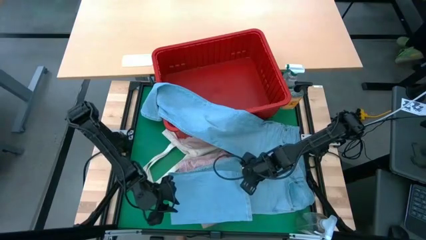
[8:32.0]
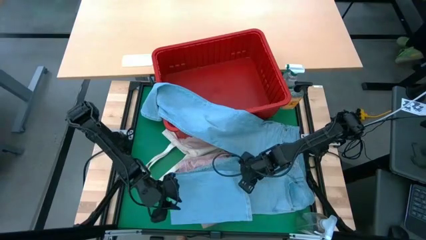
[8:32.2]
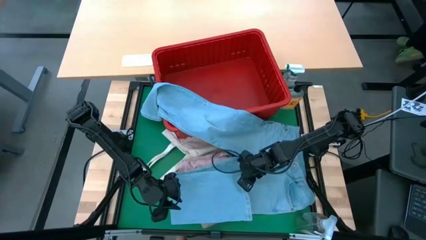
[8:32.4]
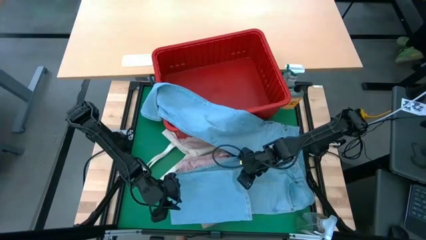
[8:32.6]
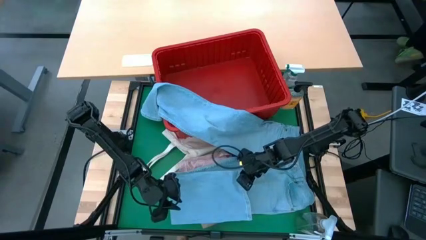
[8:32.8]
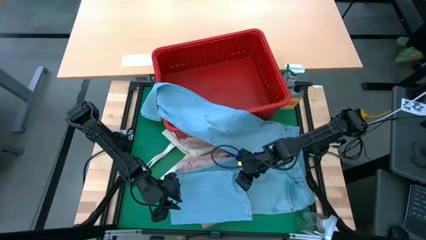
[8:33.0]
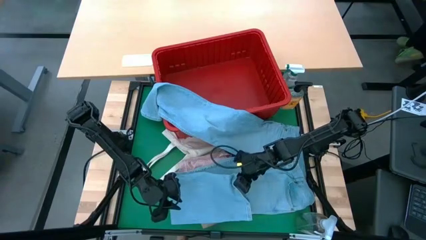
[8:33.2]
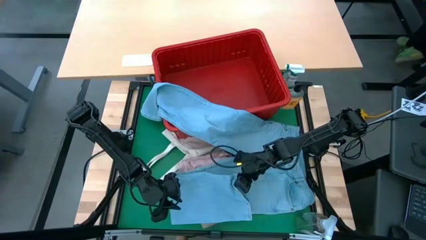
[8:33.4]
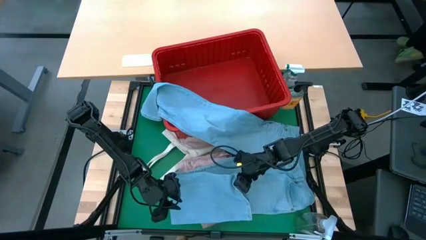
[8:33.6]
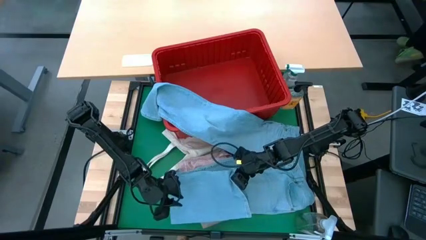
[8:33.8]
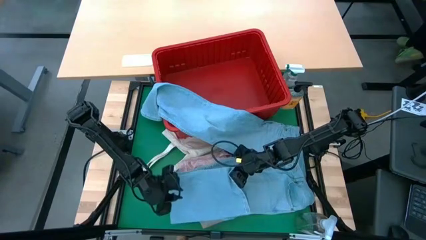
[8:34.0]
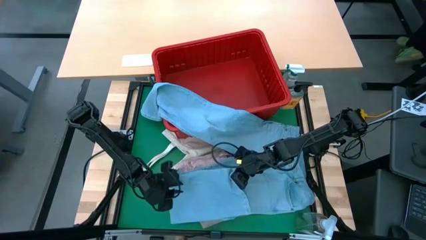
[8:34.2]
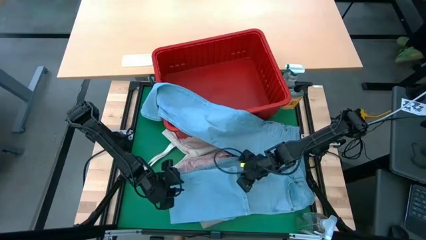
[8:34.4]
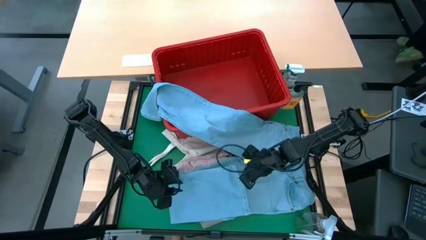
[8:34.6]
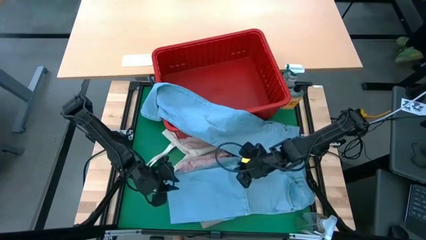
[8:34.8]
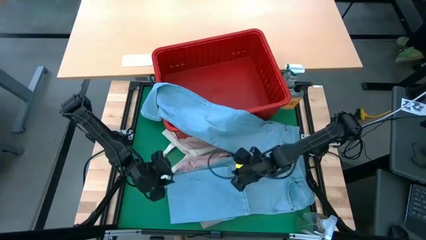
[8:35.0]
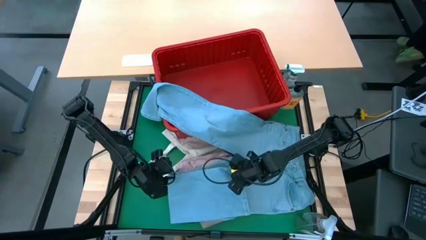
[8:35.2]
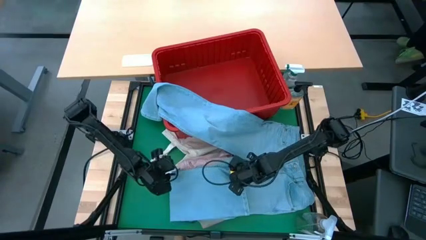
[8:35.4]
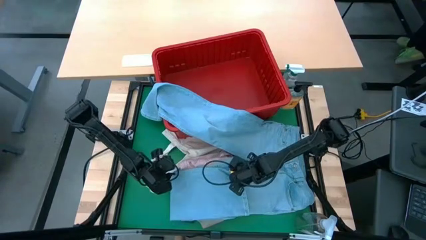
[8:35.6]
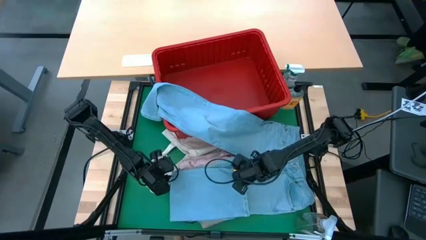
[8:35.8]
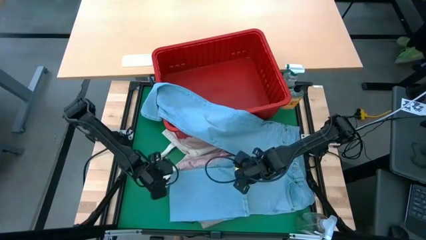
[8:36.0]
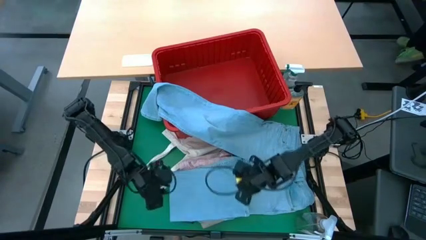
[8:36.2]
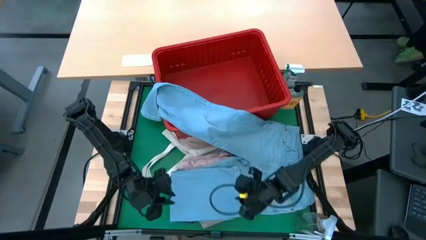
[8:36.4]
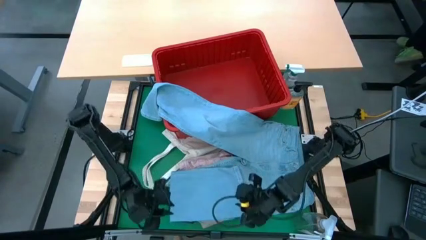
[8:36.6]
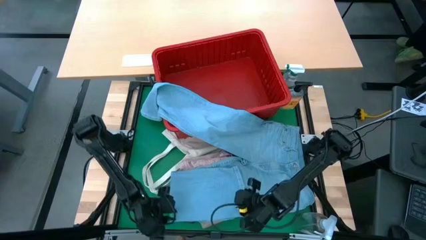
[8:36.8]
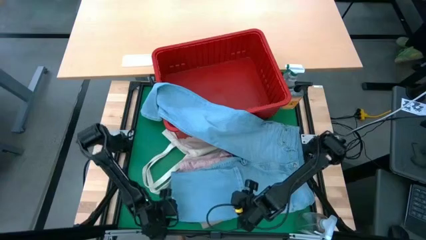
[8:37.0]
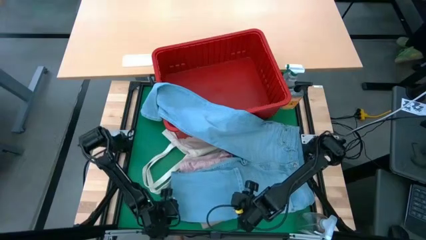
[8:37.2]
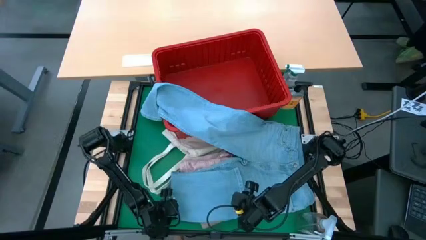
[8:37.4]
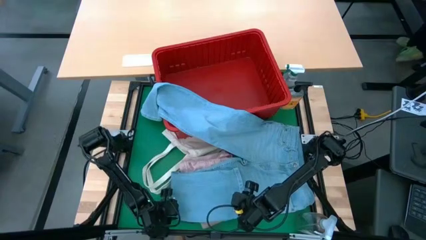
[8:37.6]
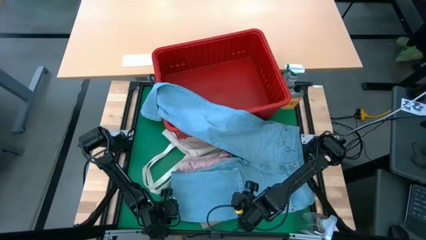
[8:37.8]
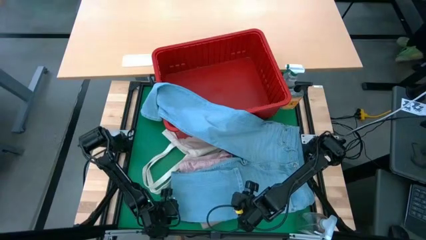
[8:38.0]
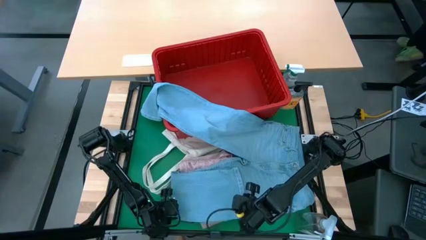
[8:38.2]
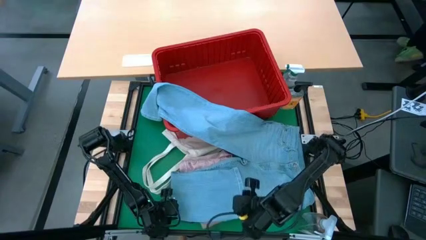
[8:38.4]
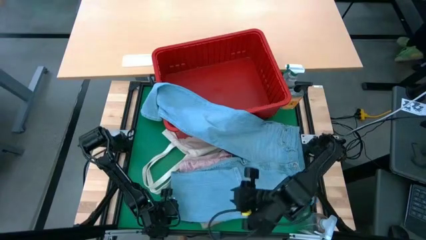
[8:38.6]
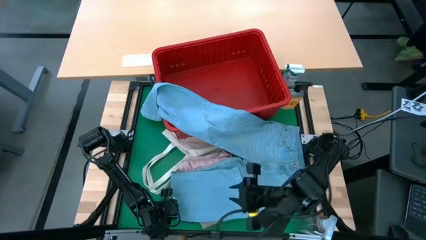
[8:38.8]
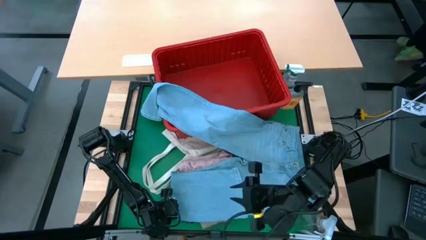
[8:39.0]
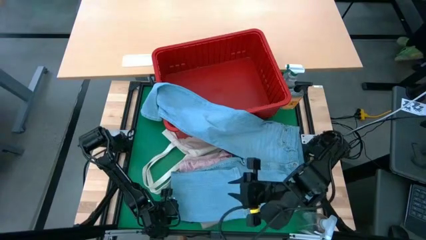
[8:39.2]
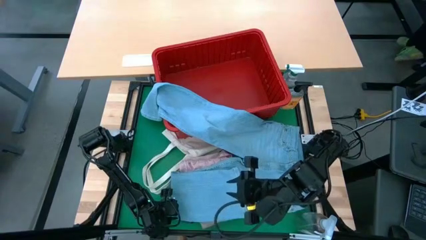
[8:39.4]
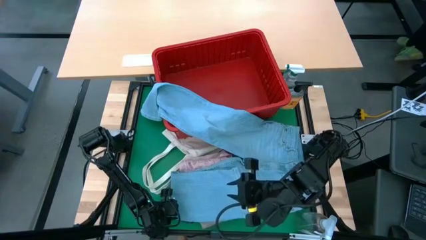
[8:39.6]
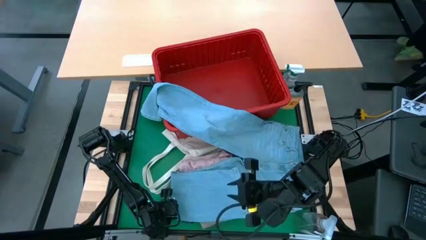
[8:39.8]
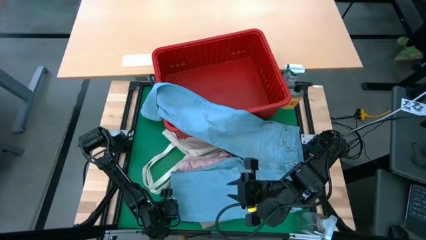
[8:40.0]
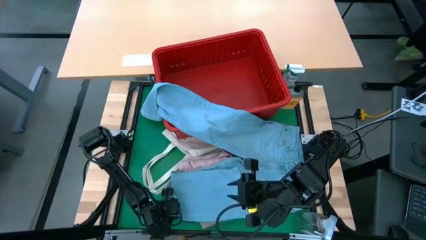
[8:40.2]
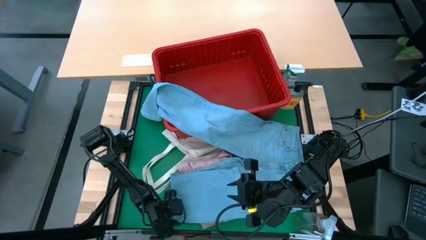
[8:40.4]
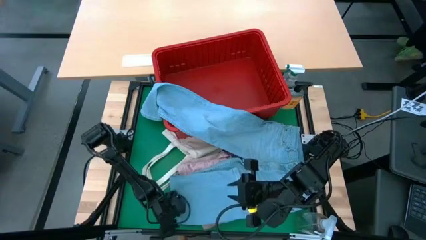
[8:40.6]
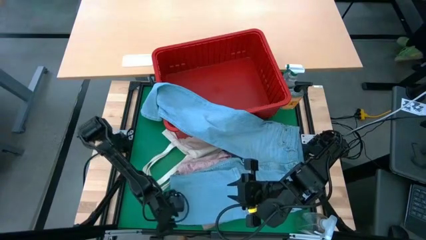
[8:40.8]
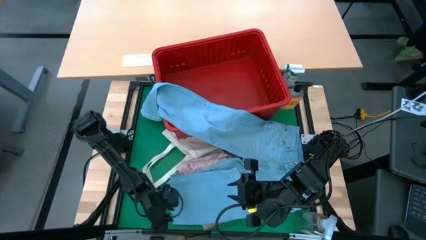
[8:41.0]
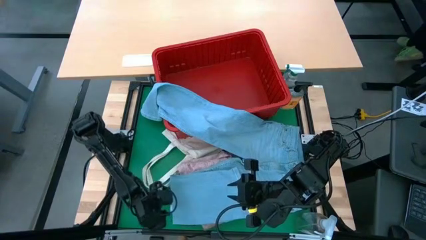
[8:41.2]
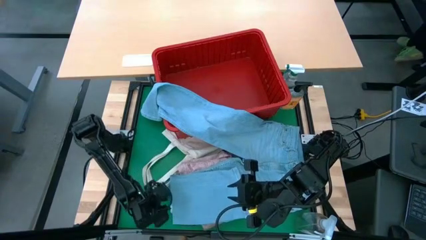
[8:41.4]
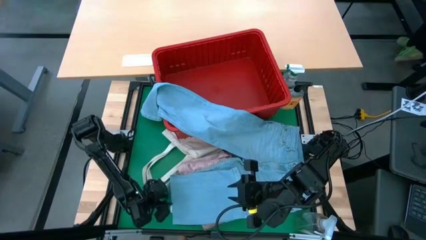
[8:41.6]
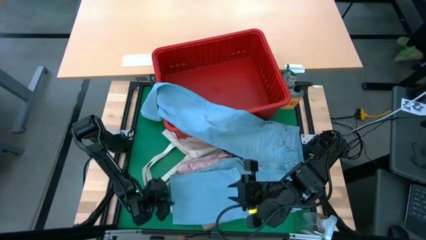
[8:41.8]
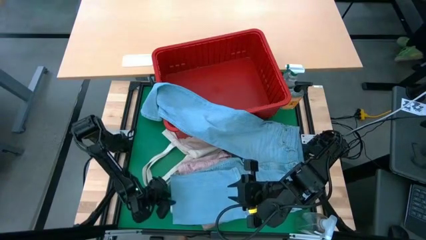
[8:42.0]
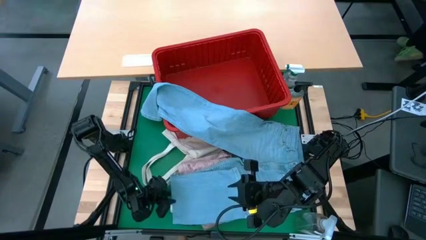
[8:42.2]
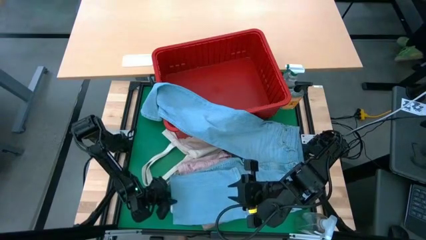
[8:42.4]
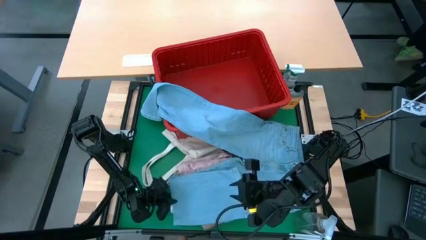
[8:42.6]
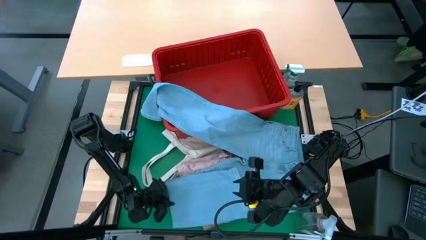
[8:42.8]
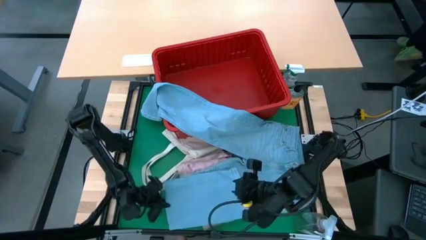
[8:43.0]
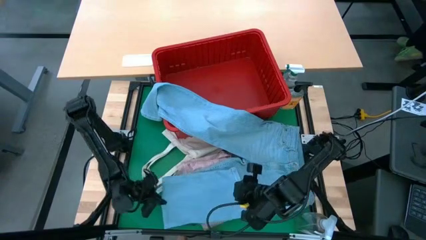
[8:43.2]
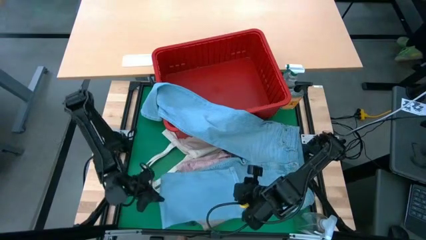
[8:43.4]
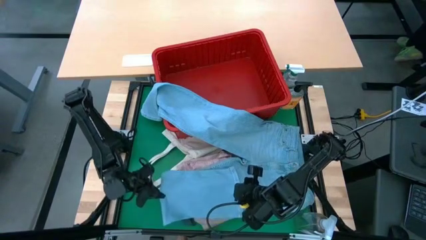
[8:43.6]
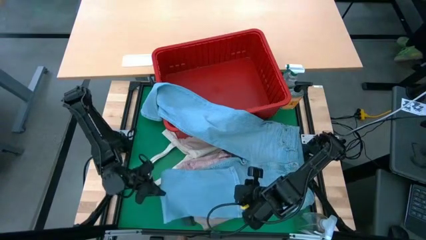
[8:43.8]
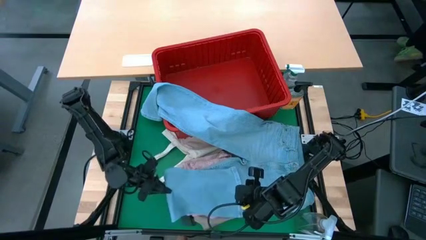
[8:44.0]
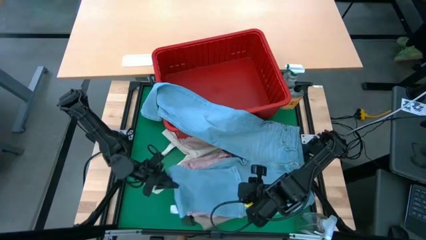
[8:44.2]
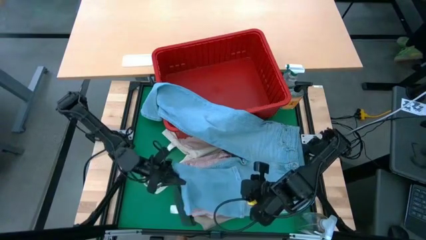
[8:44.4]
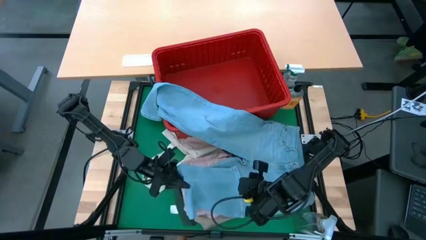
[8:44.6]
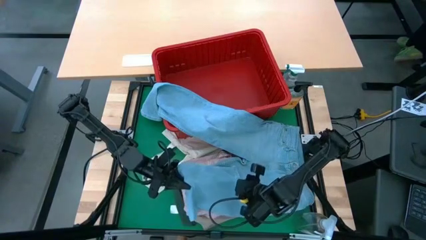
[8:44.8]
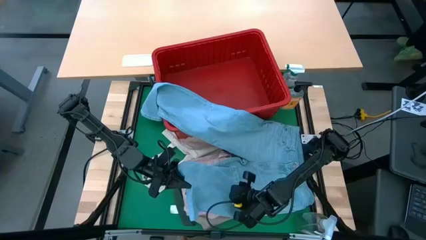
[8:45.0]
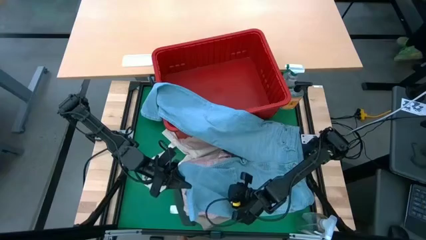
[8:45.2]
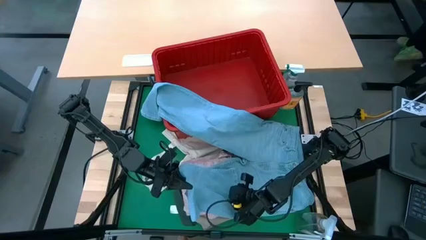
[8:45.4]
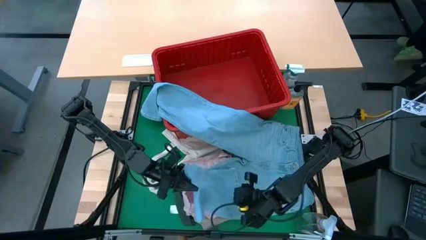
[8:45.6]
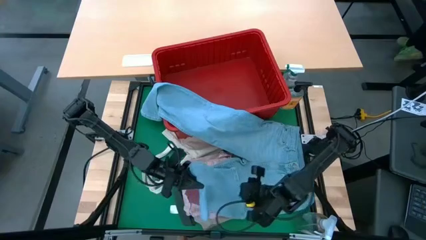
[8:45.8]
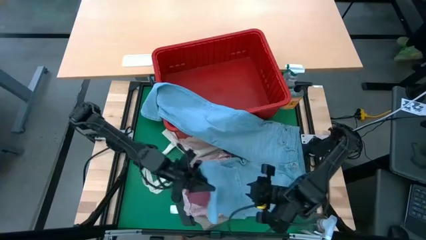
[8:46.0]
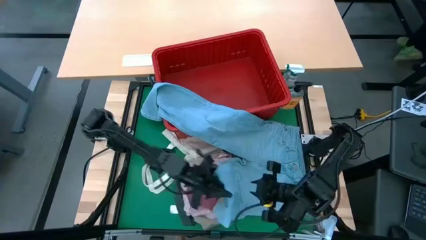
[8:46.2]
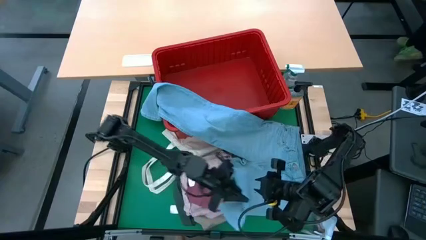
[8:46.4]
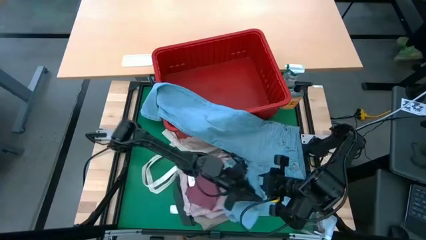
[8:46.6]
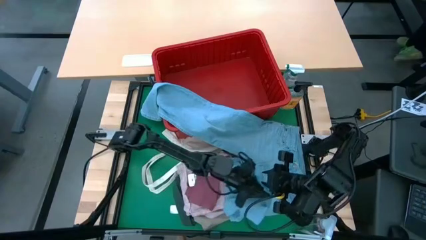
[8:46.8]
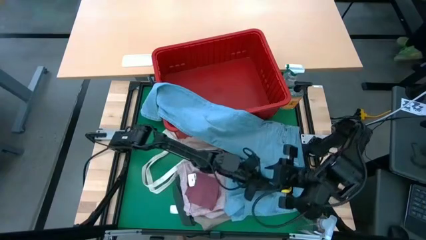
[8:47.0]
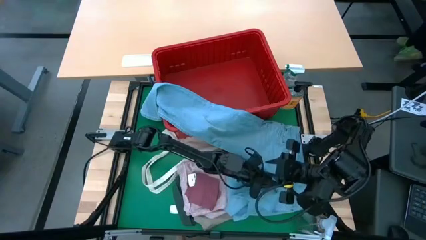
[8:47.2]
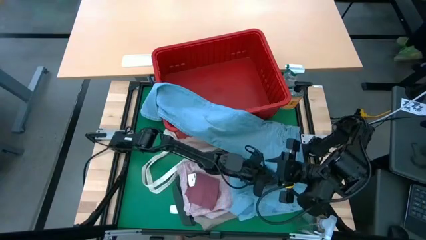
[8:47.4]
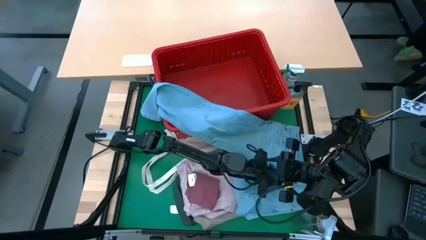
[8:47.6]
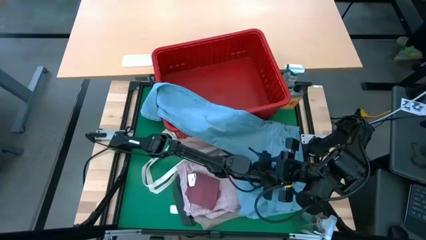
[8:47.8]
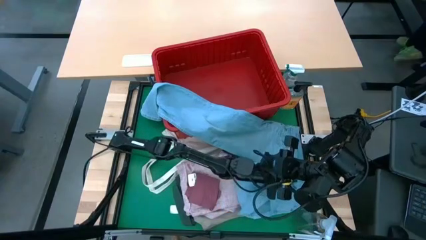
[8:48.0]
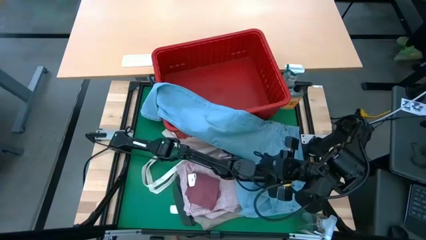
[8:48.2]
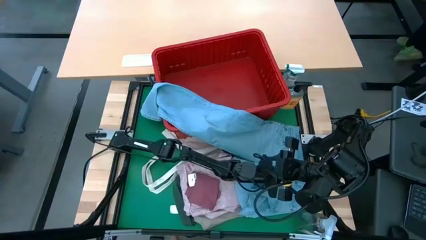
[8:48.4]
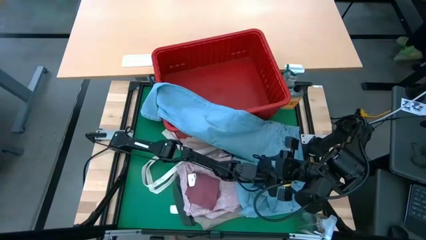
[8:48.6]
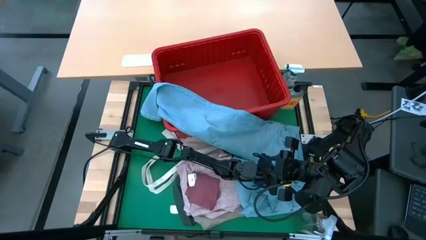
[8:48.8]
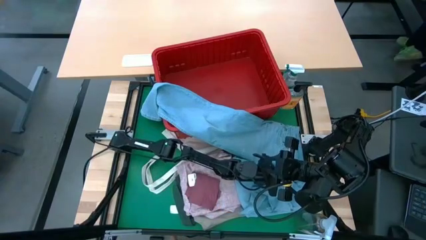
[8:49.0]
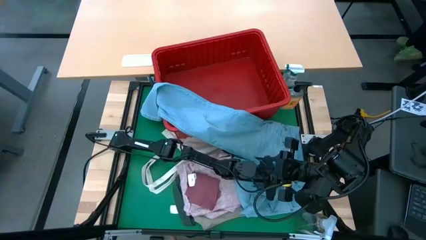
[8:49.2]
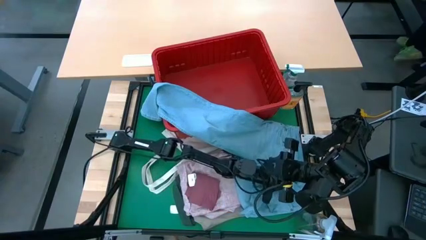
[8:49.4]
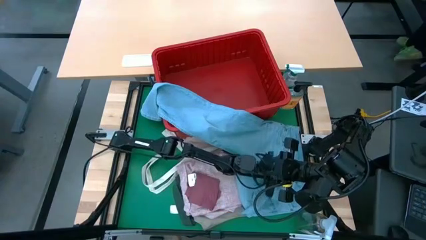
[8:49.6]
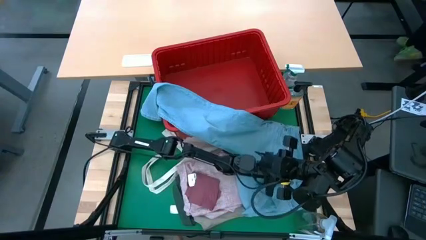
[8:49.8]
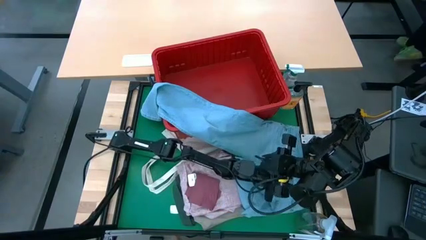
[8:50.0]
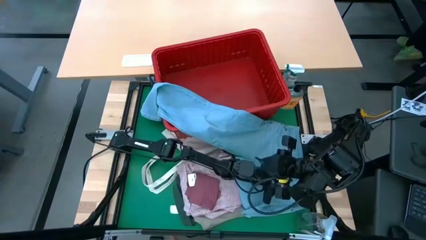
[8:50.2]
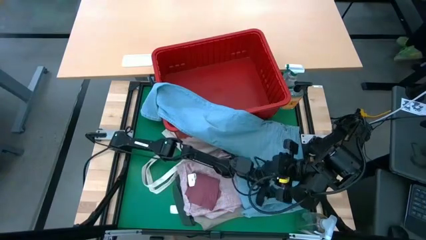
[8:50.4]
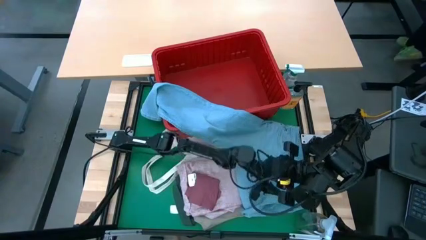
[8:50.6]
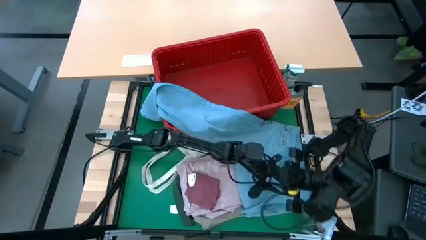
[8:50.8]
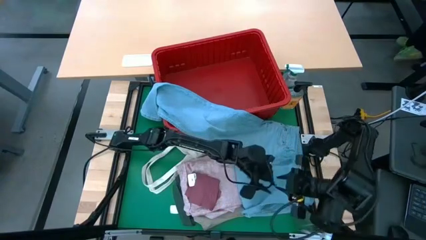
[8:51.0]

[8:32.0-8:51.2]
Task: Fold laundry
Fold the blue jeans
